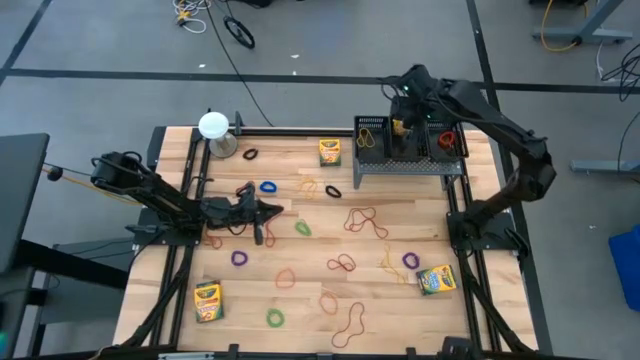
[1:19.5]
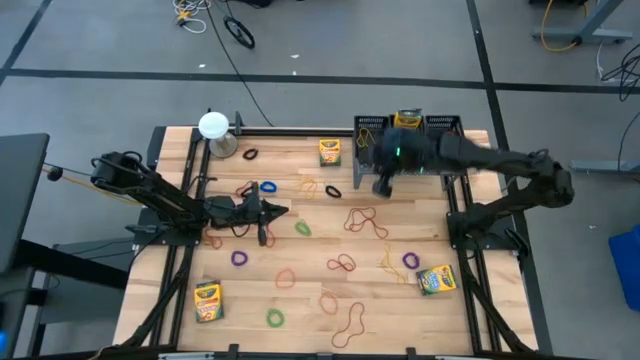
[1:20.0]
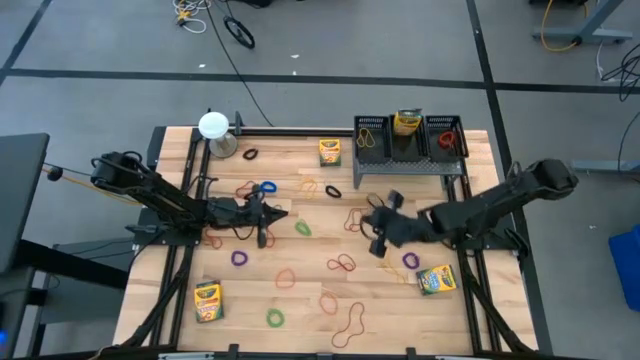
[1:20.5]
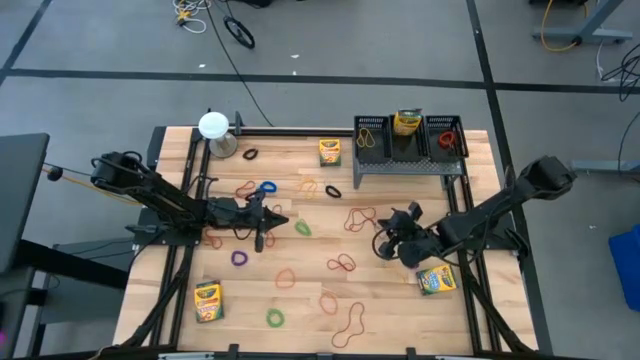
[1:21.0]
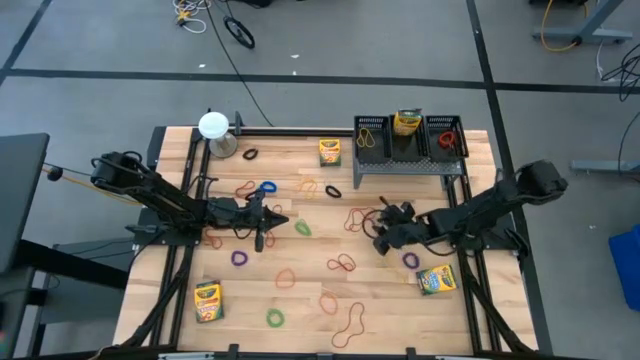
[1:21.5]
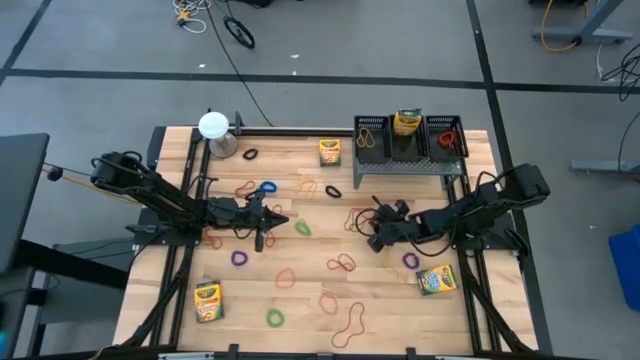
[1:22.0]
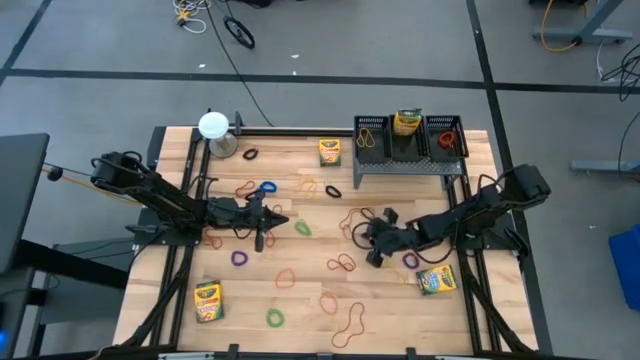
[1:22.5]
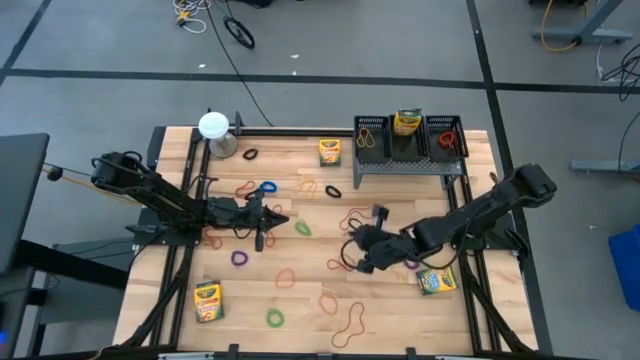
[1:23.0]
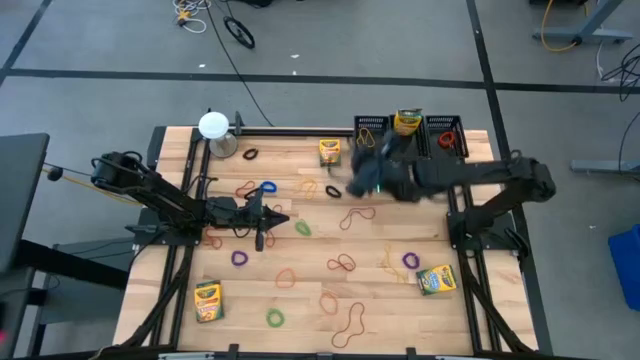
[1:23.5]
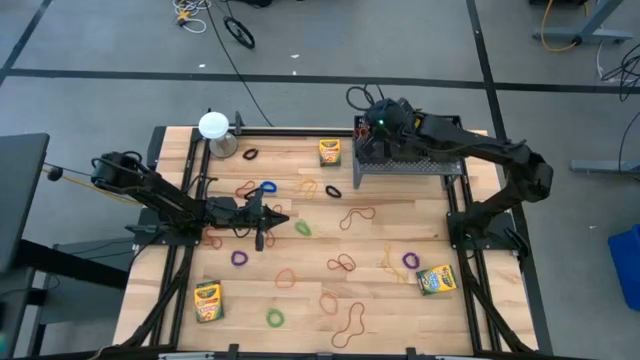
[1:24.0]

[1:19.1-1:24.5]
Task: Pick & Place Office Desk Supplies
Put the red rubber band into the left black bin on the shelf

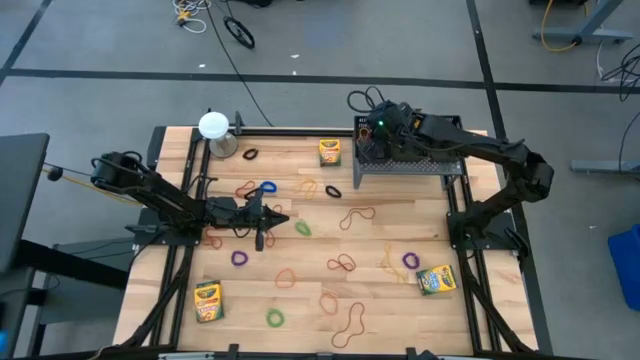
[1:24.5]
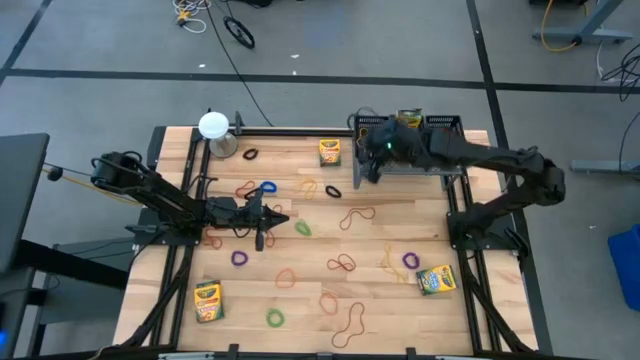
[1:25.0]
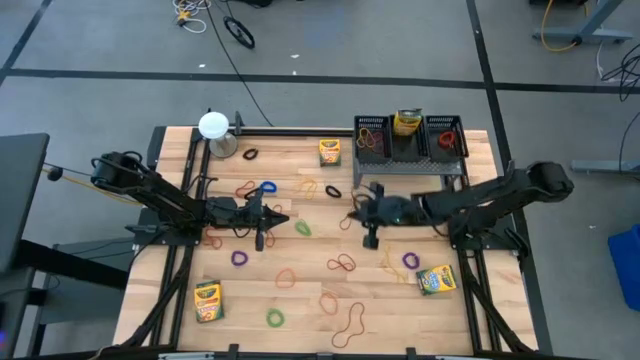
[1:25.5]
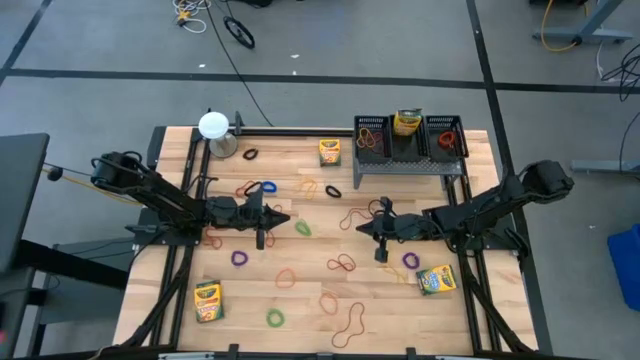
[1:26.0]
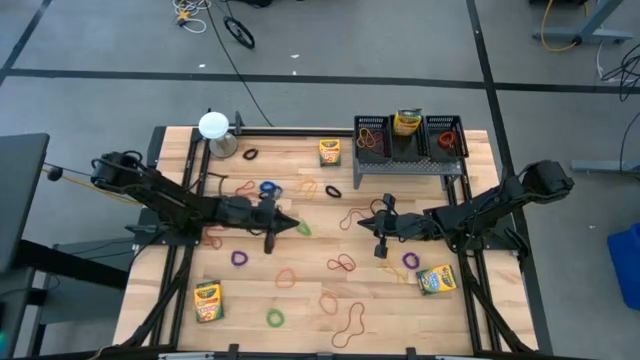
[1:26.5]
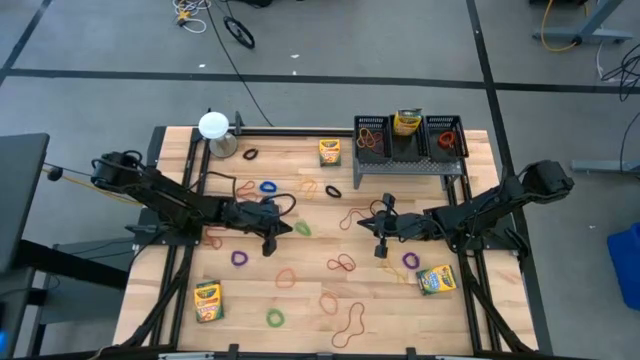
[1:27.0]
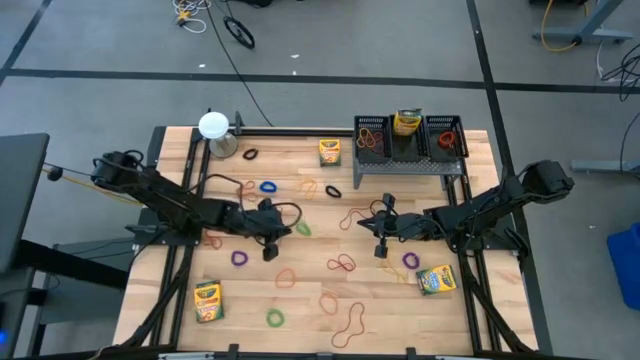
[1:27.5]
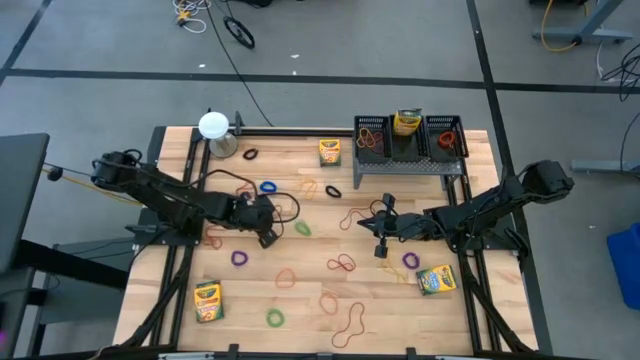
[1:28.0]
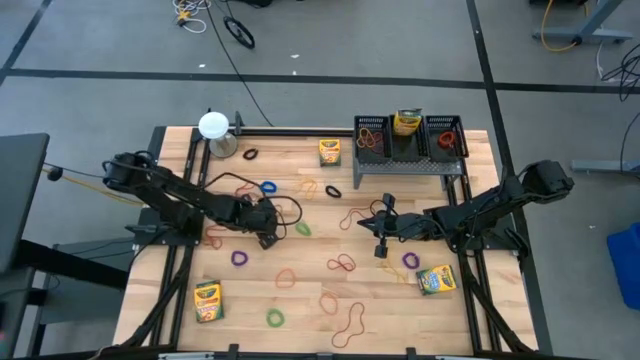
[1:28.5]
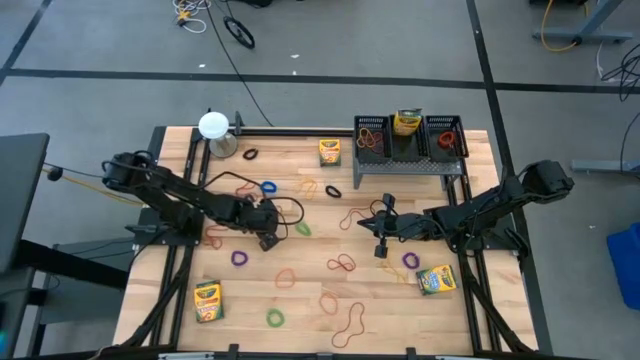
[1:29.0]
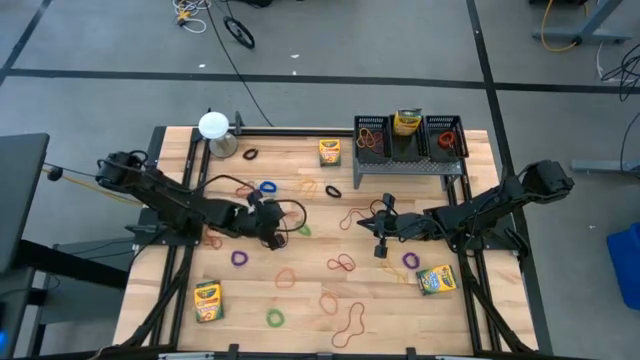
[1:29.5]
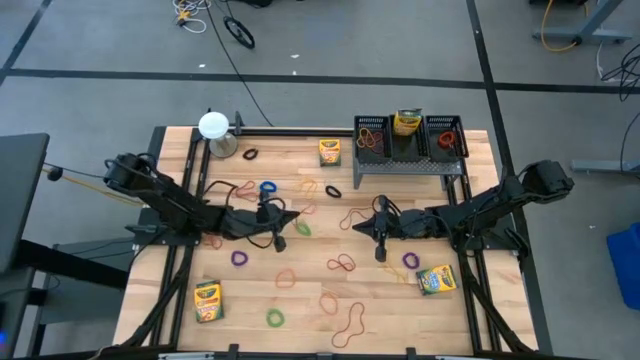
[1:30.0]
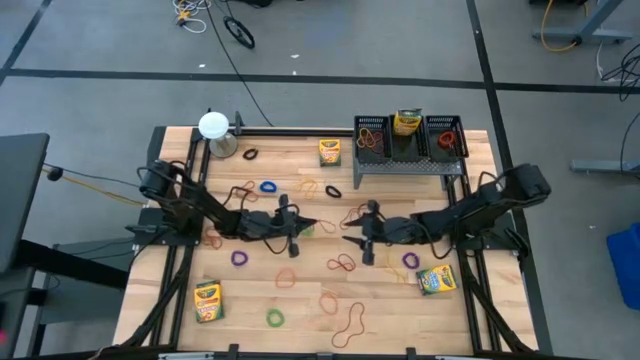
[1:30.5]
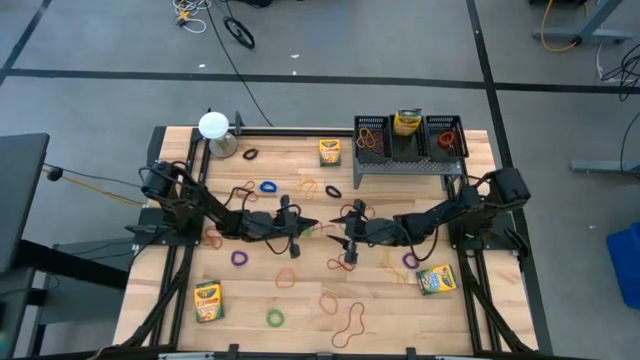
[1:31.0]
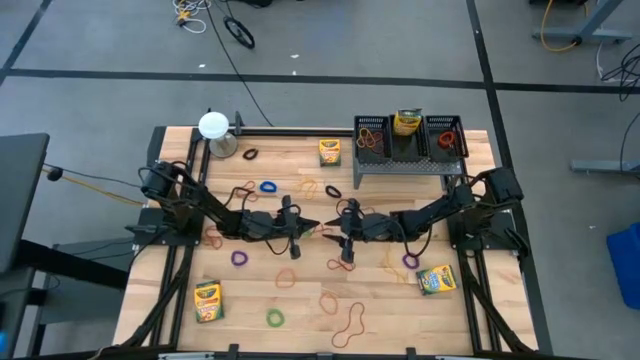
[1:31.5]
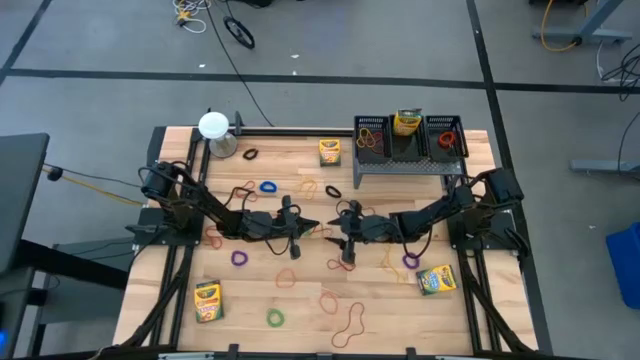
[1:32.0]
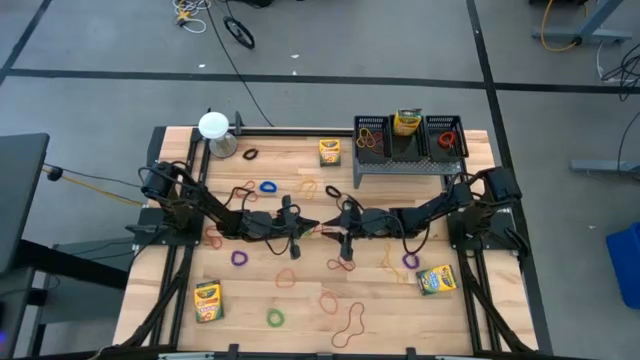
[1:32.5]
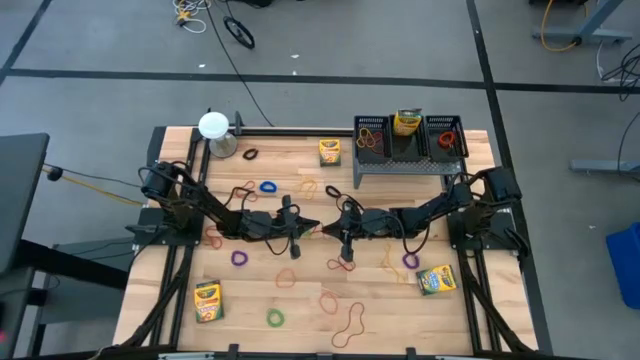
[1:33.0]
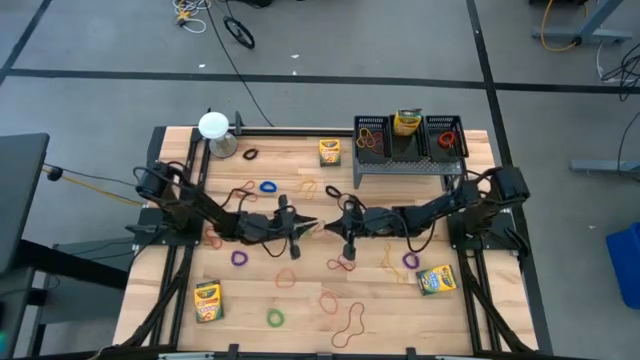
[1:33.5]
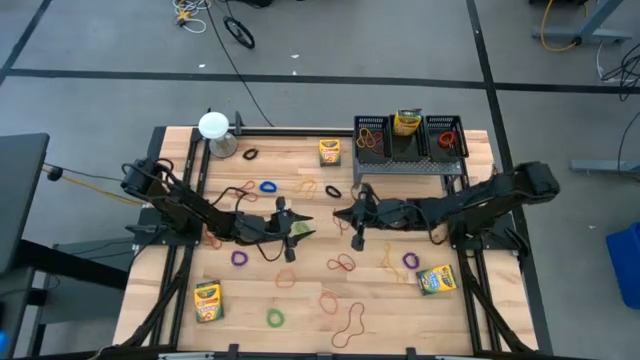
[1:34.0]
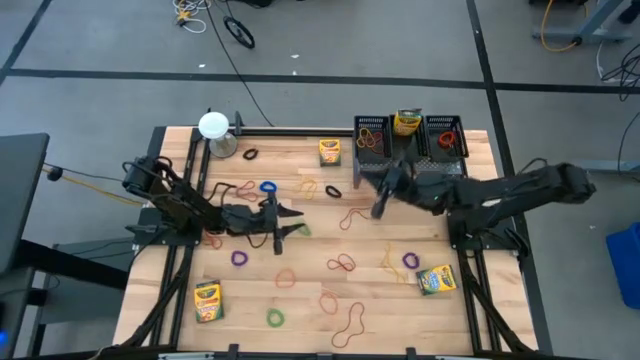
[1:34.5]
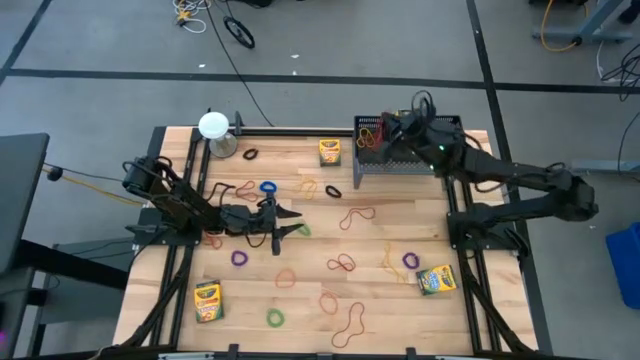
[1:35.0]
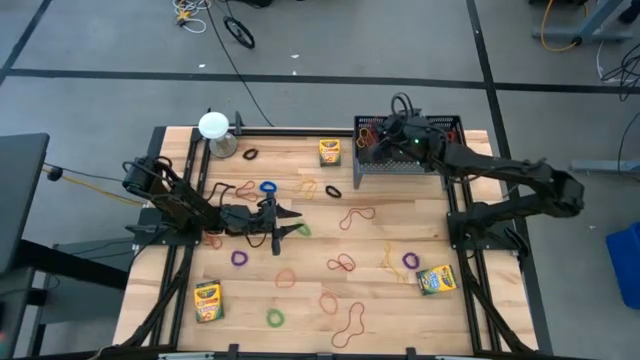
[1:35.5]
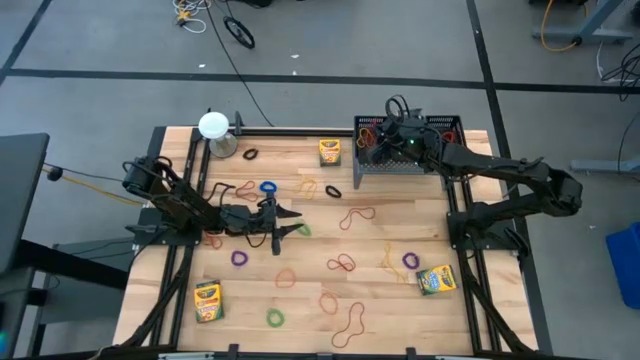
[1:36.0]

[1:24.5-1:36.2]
Put the red rubber band into the left black bin on the shelf

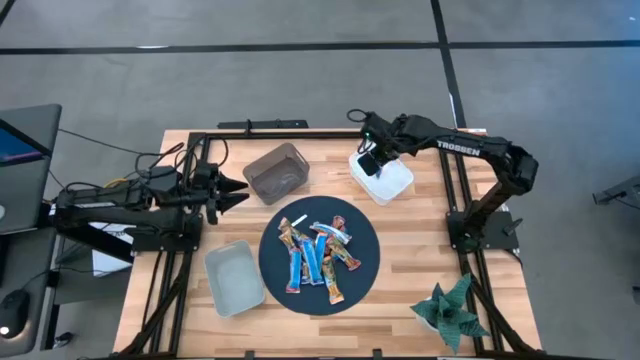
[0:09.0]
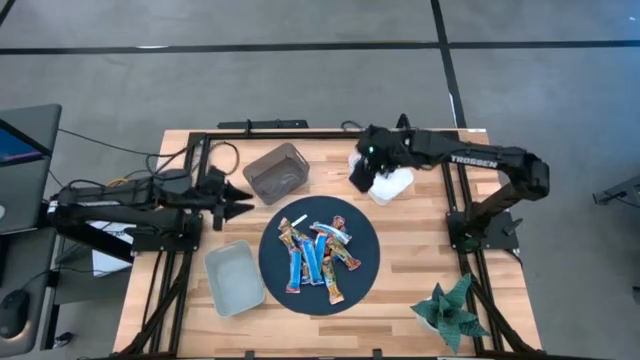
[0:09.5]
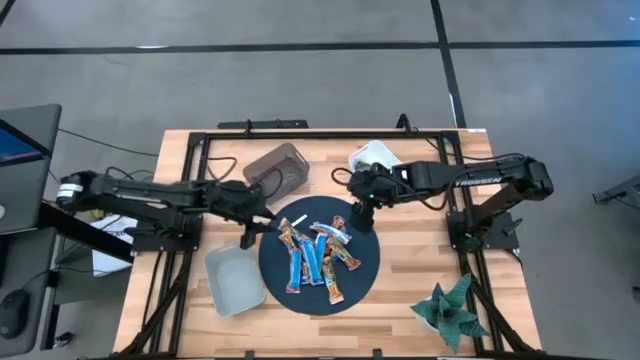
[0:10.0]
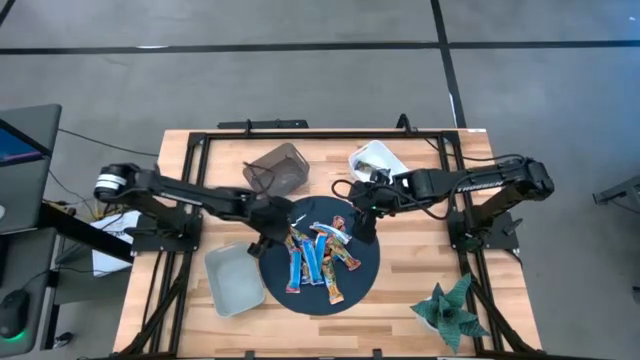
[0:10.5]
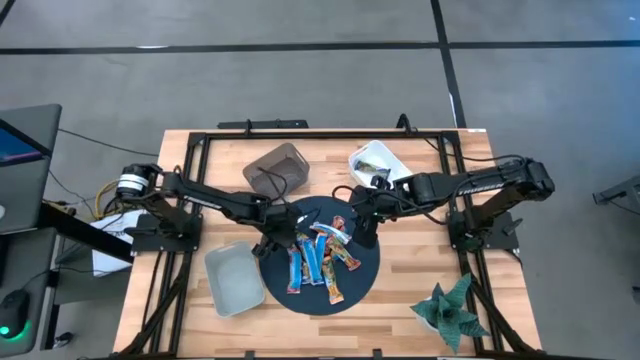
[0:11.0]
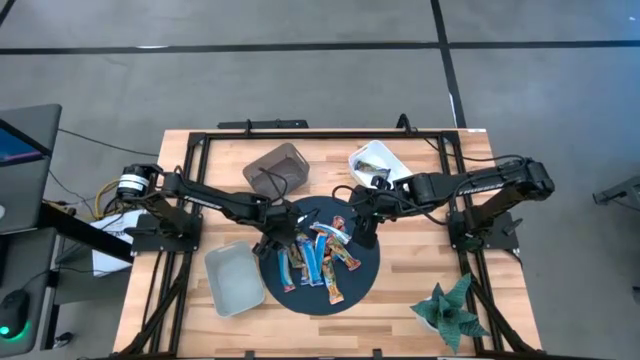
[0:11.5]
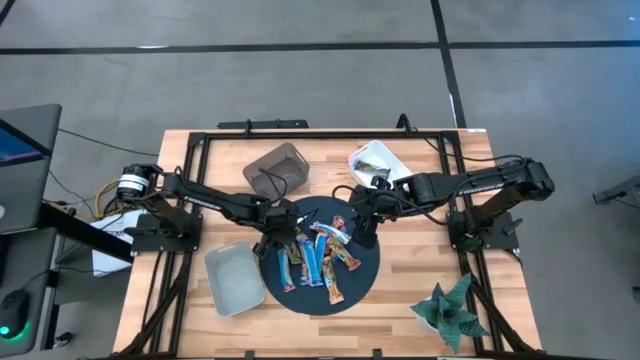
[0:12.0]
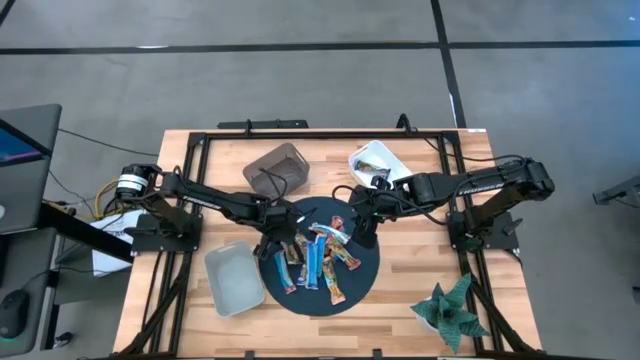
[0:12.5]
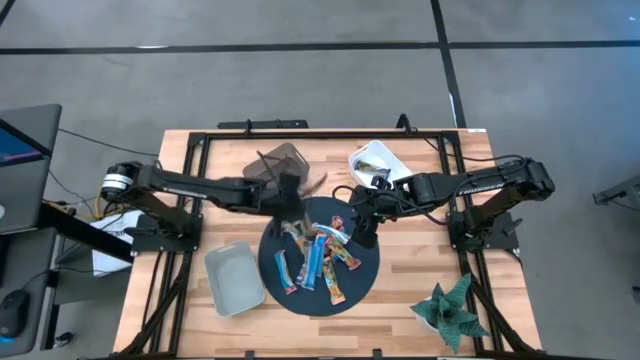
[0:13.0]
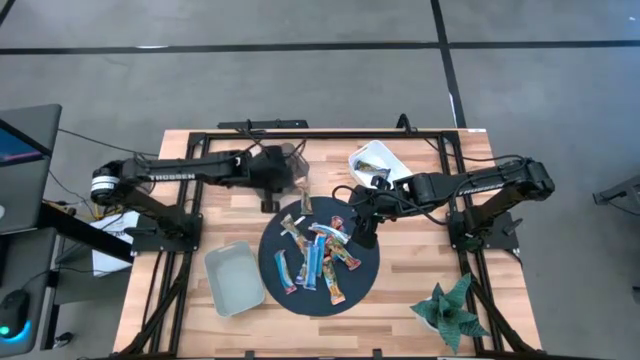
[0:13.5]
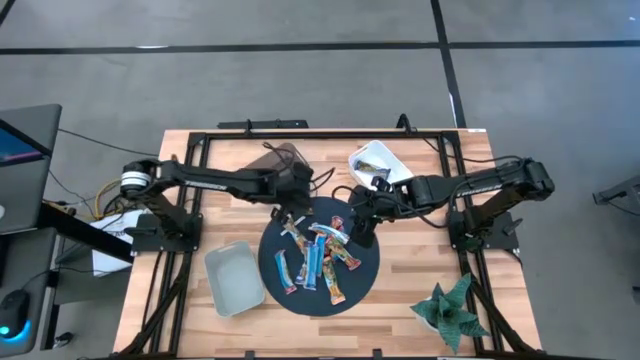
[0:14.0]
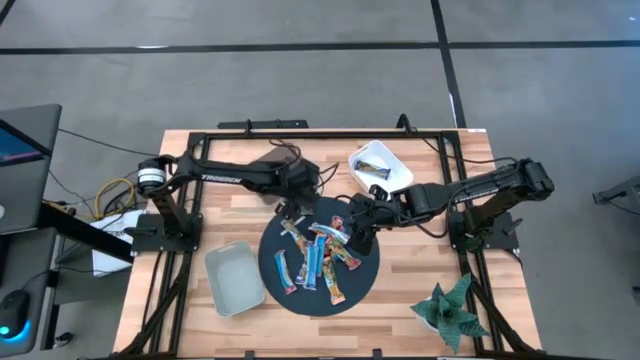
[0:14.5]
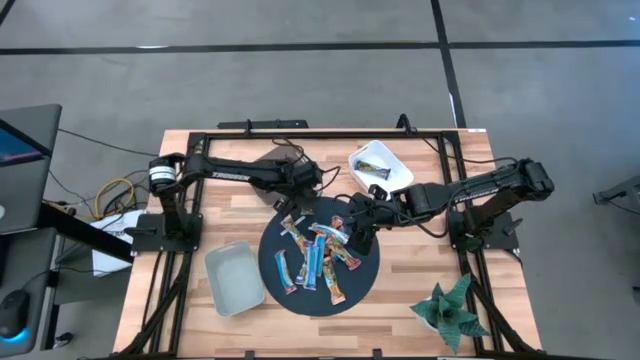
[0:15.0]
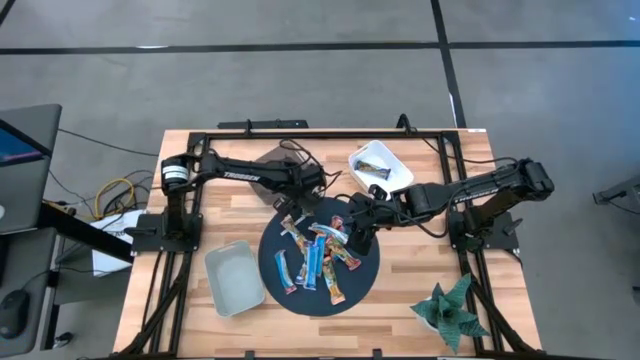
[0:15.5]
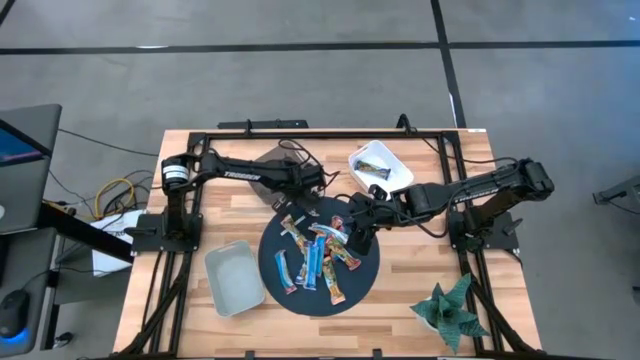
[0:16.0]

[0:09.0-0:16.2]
Task: Pick and place Granola Bars by type
Put the yellow granola bar into the black bin
